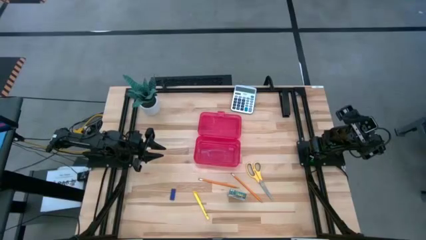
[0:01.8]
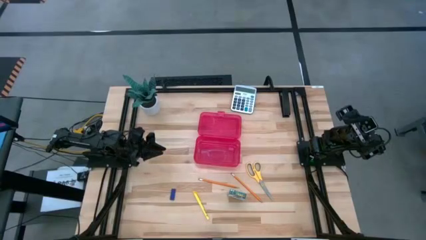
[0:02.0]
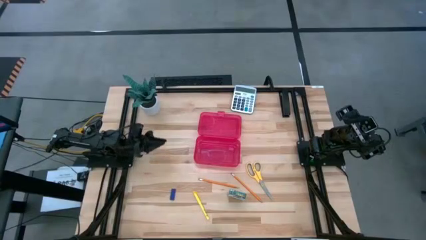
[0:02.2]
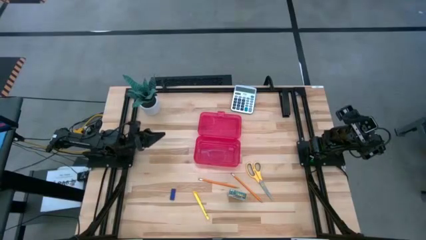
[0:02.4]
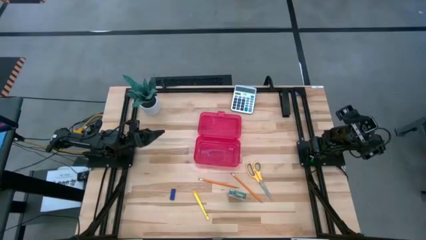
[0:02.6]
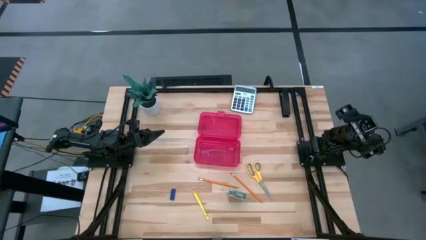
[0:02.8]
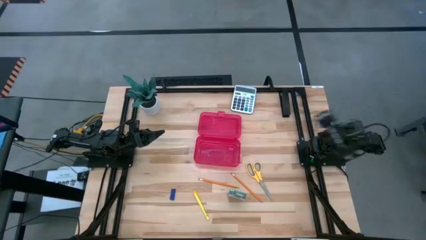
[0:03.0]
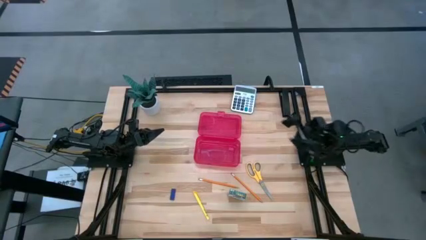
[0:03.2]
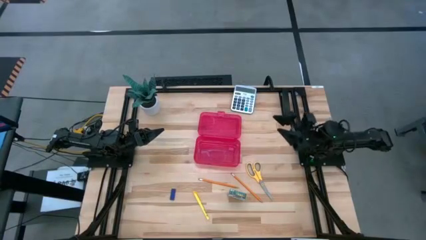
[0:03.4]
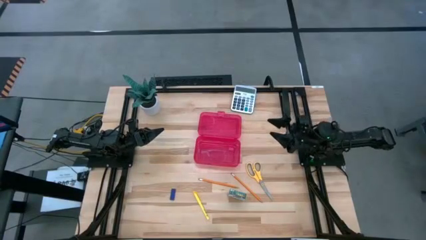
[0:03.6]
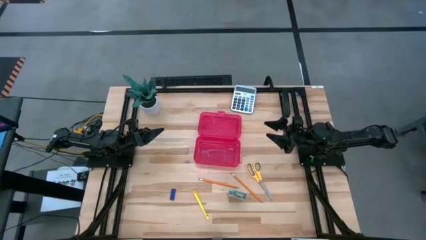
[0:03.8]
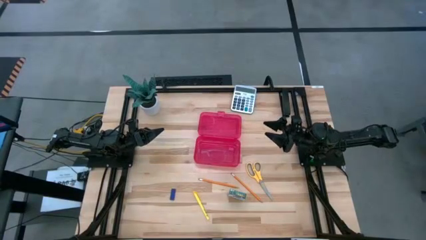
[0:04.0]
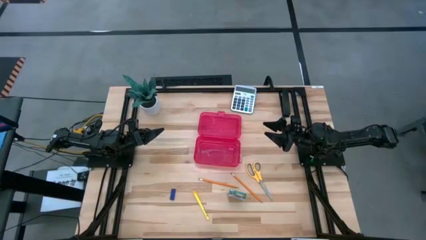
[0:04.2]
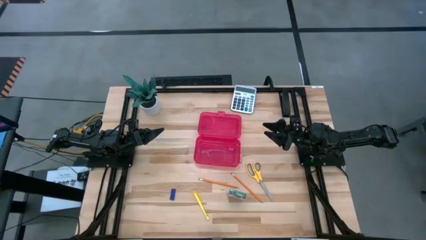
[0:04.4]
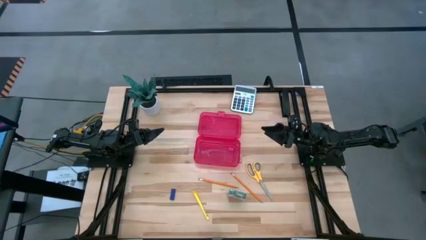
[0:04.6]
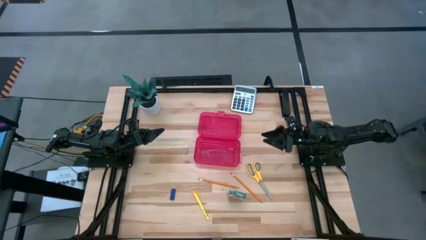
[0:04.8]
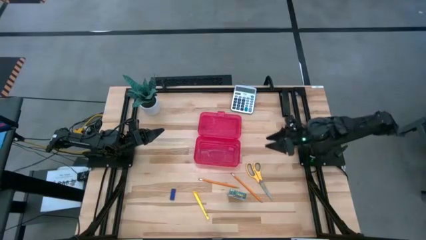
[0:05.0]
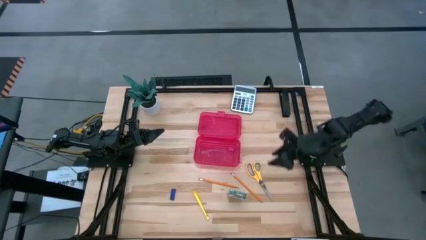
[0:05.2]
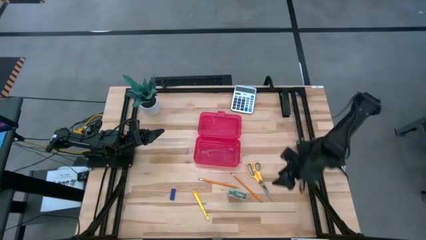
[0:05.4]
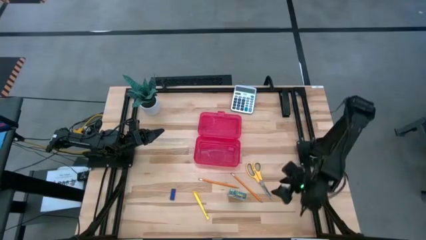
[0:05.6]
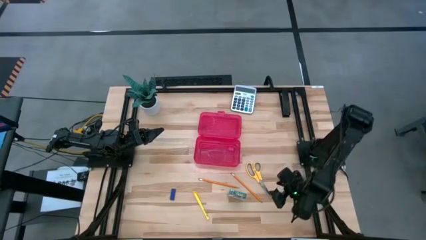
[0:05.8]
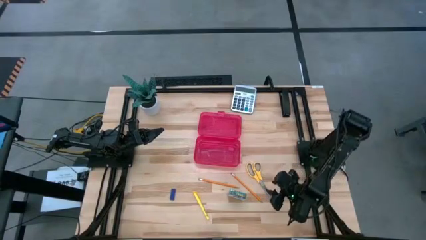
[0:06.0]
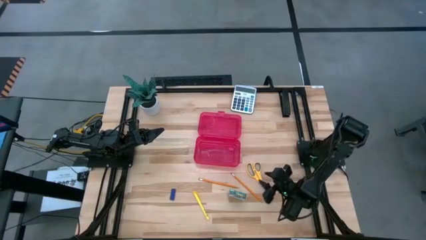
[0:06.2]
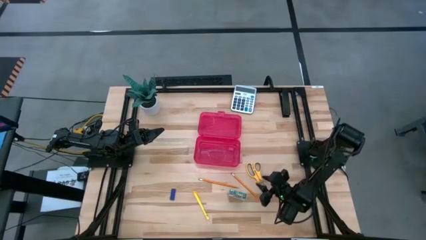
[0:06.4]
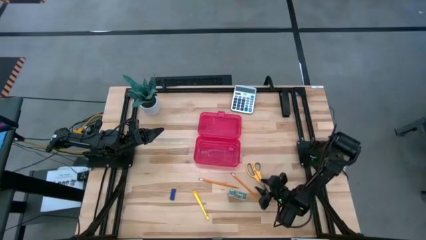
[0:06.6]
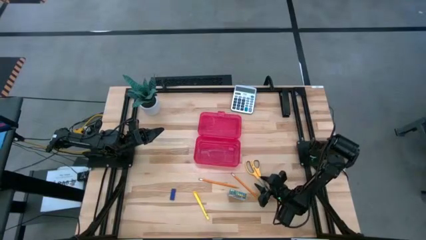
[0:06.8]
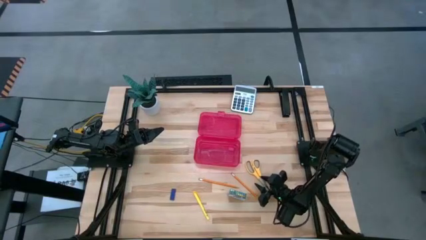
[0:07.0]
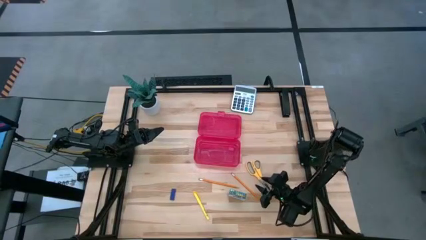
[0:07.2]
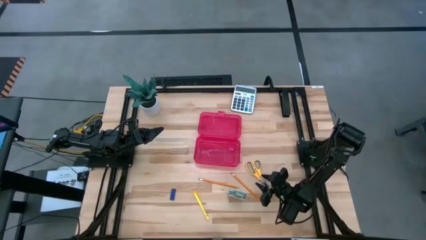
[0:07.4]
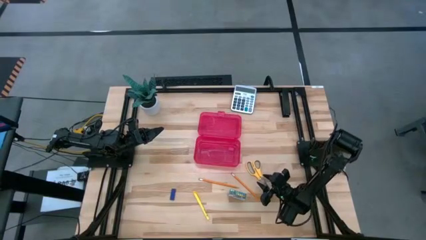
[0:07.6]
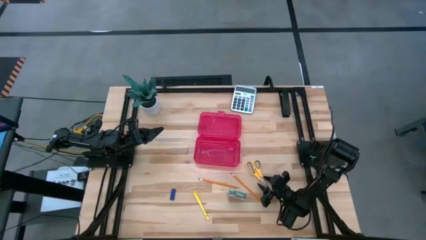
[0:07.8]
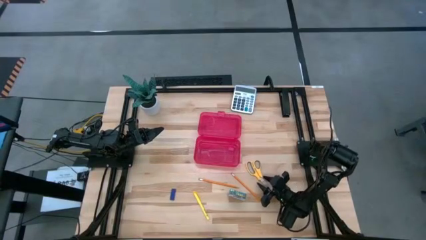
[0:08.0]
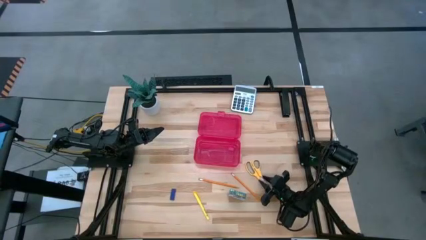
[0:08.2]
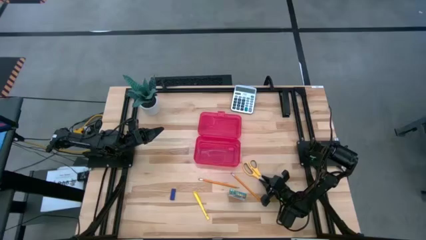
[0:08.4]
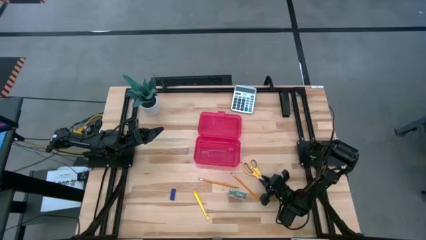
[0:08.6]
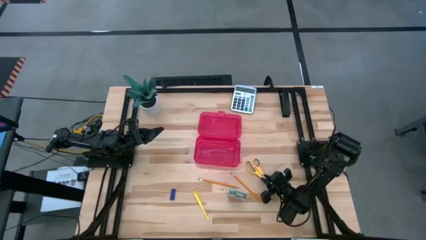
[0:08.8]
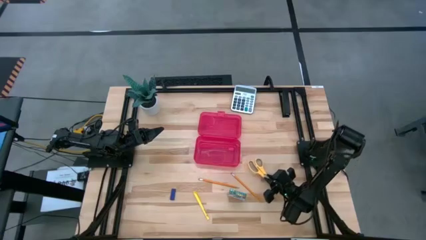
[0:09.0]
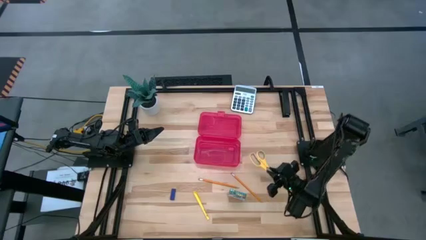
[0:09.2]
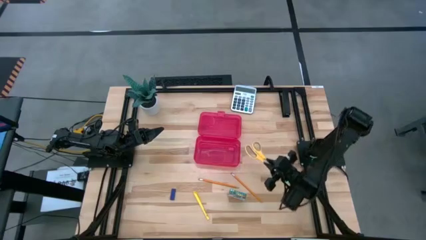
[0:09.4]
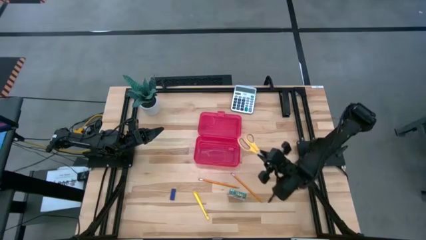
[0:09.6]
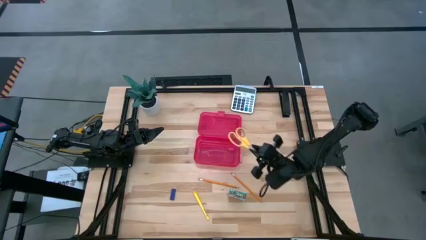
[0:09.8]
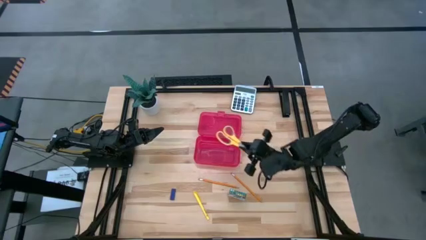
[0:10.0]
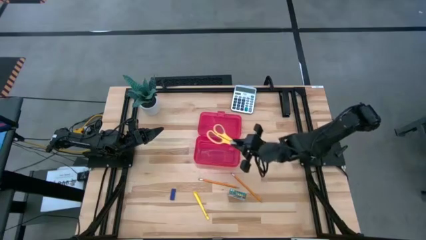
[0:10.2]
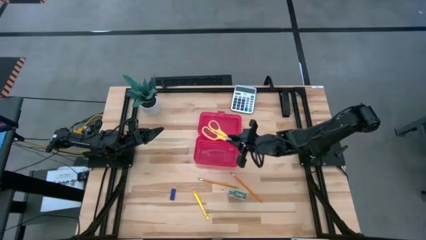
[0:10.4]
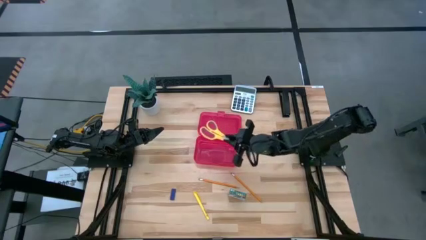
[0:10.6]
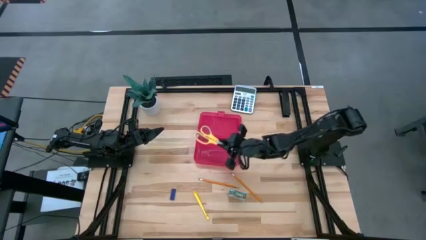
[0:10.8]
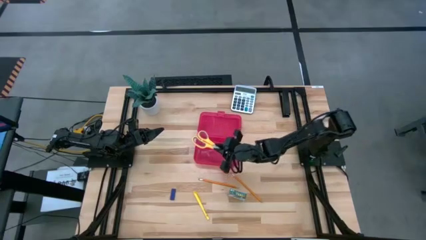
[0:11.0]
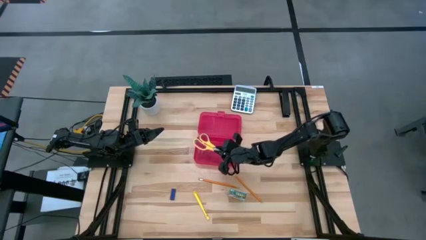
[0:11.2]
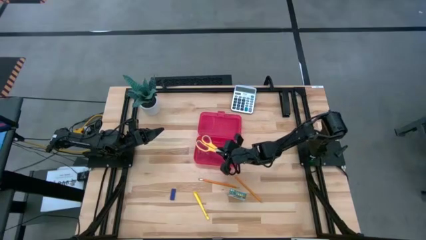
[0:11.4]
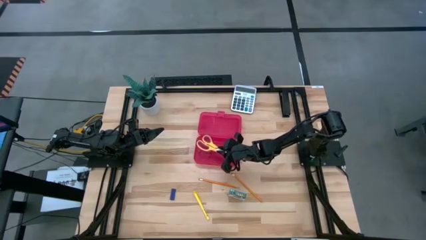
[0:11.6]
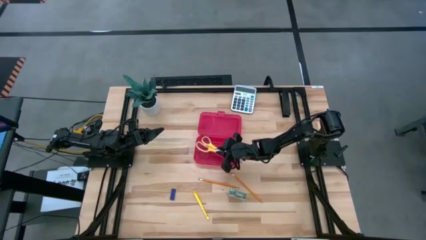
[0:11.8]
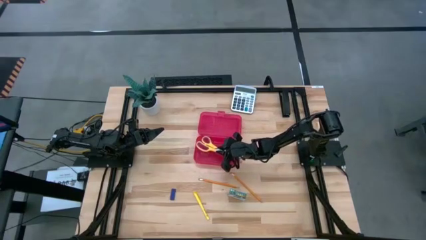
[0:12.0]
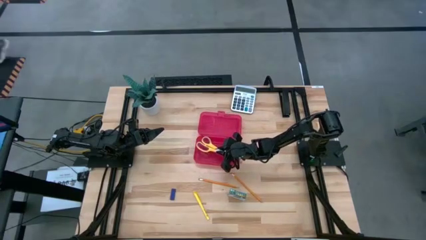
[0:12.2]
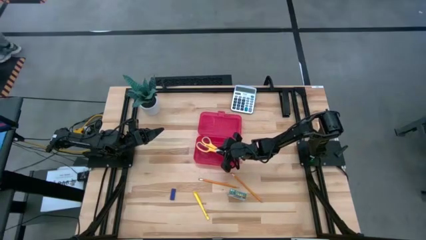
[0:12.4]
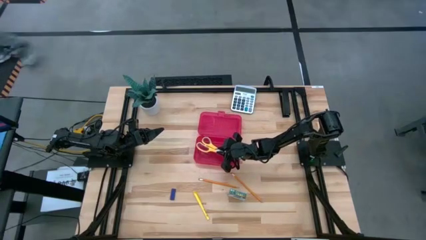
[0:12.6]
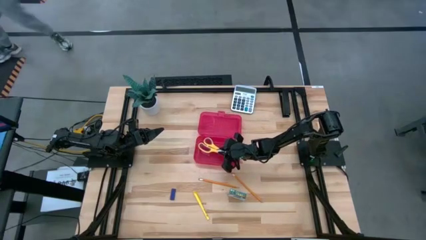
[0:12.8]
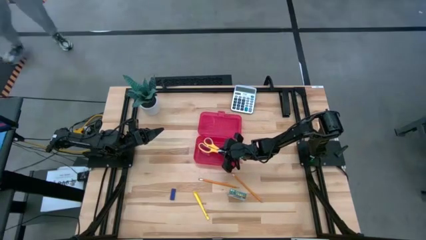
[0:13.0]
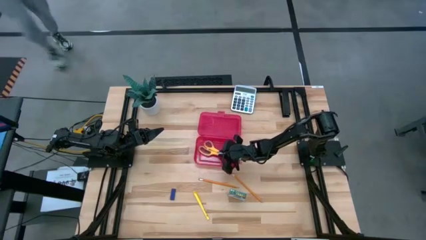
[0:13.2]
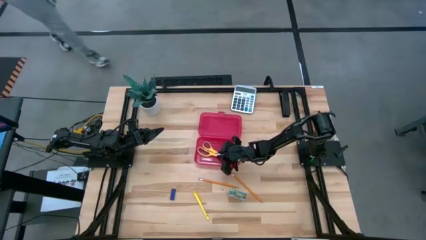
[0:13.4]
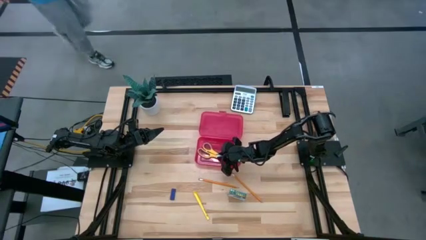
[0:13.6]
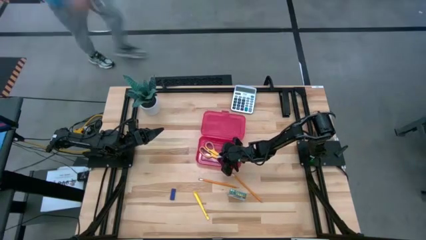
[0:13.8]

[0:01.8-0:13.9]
Task: Pack school essentials
Put the yellow scissors into the red supply box

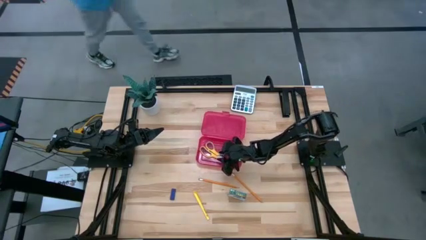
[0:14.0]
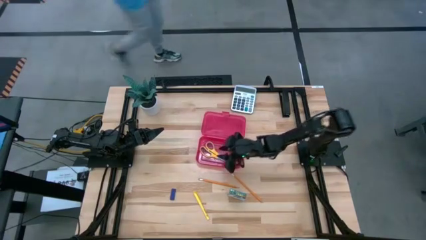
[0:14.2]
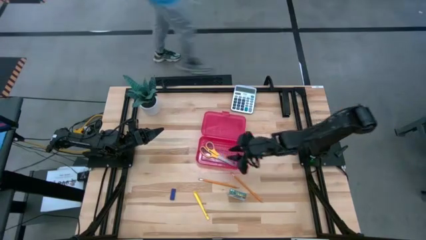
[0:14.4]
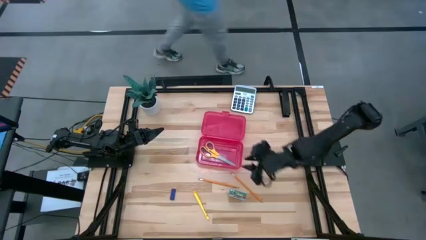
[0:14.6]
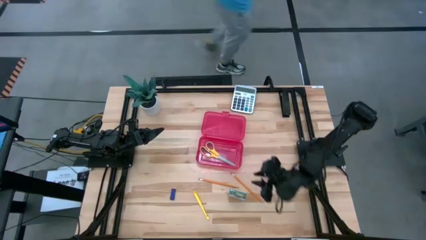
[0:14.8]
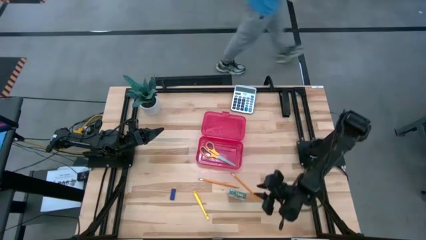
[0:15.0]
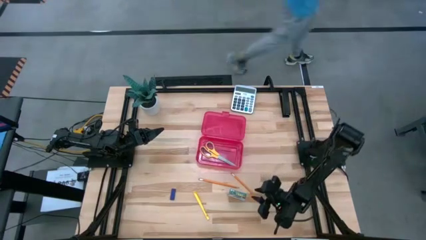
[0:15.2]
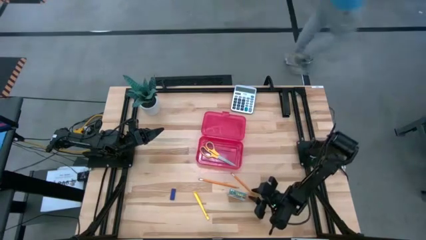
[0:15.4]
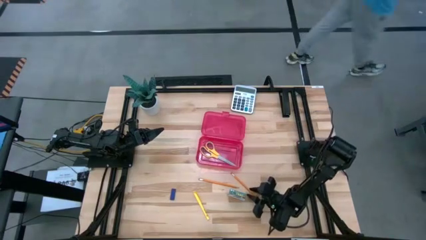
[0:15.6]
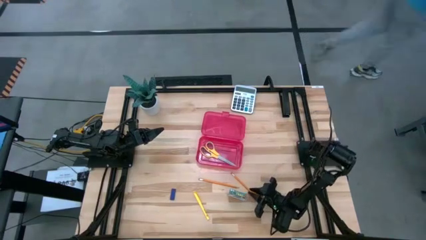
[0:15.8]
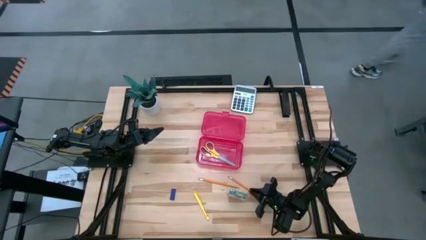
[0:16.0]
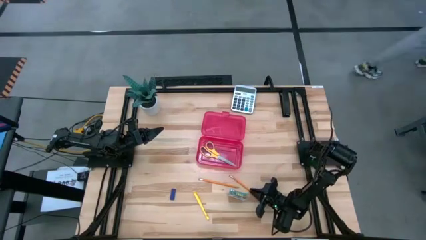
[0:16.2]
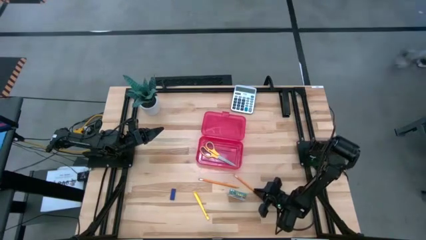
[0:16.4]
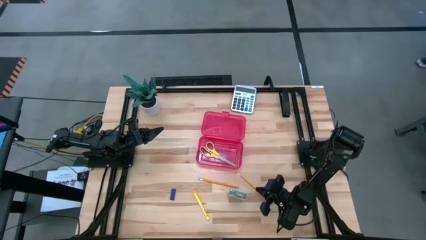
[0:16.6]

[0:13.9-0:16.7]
Put the right yellow pencil into the red supply box

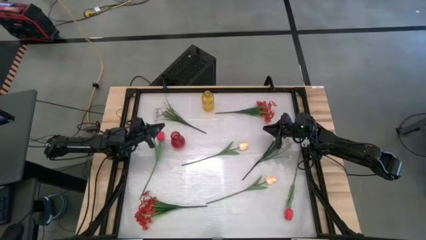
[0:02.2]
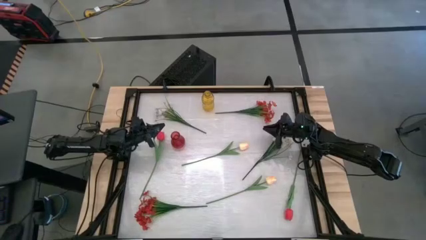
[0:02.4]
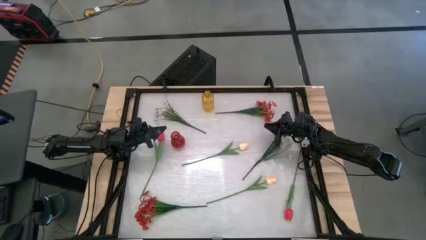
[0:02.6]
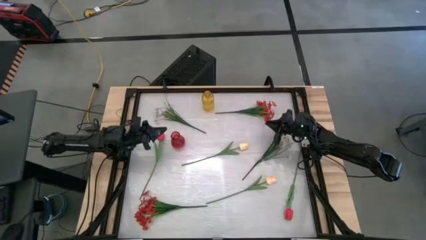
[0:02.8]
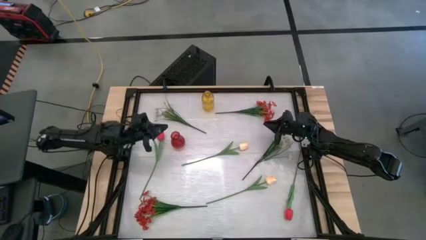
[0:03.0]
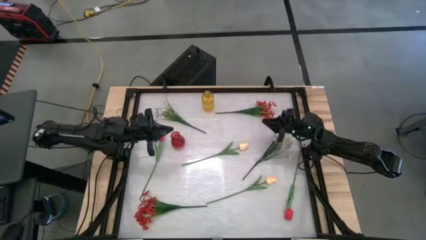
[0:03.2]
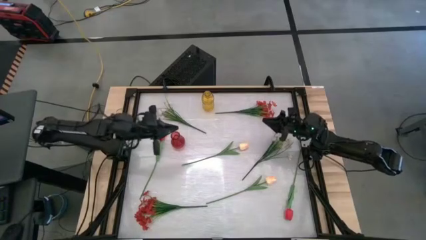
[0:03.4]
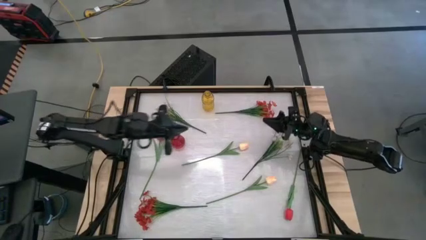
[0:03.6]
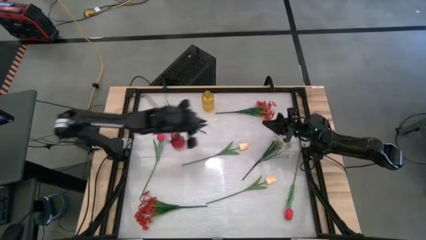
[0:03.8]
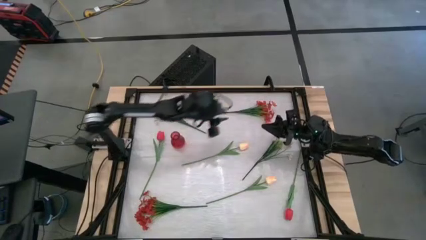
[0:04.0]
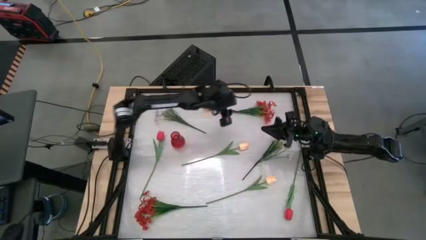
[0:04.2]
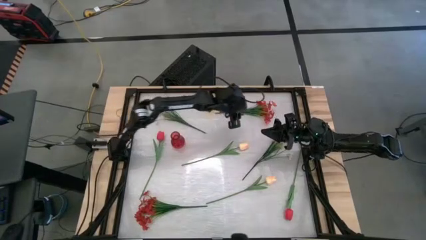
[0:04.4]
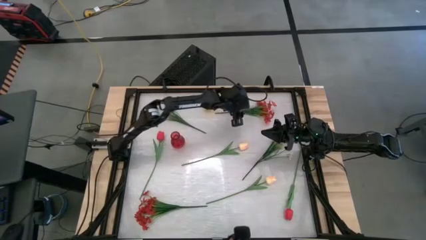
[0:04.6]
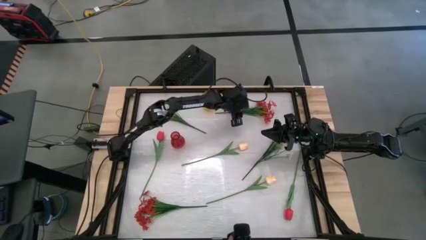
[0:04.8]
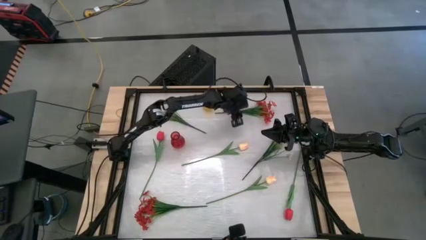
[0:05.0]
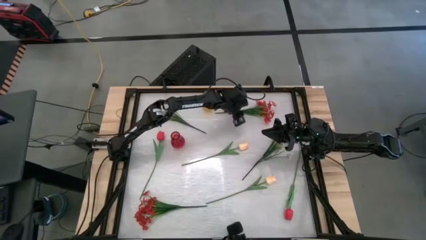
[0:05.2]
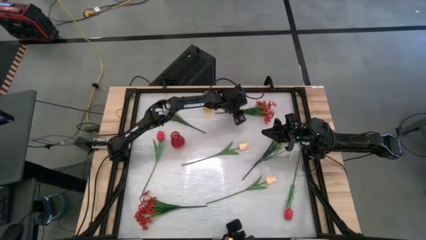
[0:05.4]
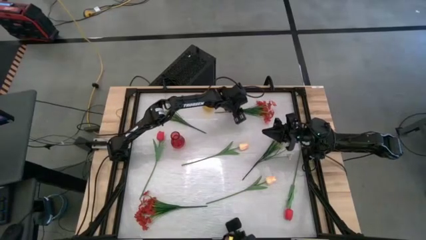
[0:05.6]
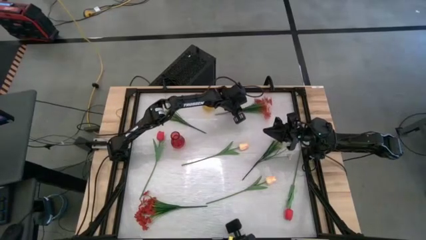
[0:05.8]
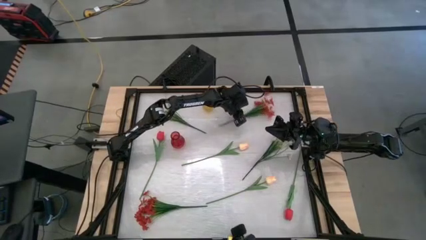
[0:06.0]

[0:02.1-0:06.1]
Task: Sort flowers into vase by color
Put the top red flowers into the red flower vase
